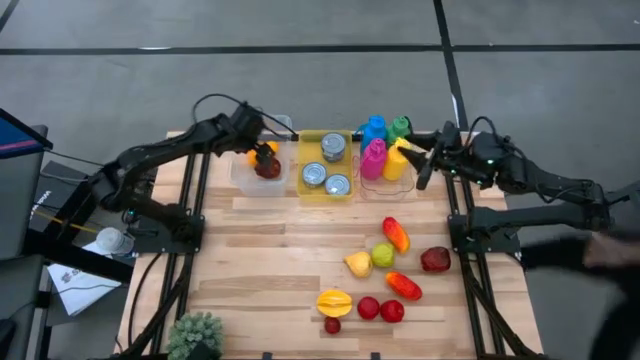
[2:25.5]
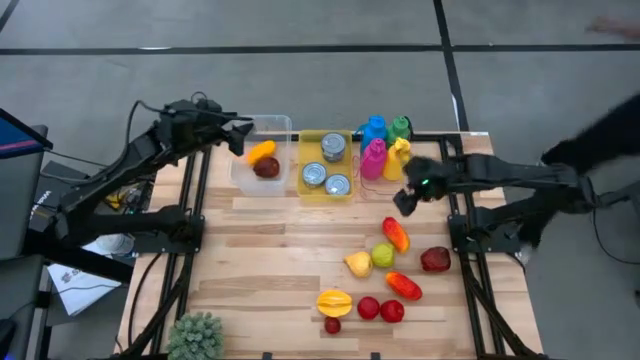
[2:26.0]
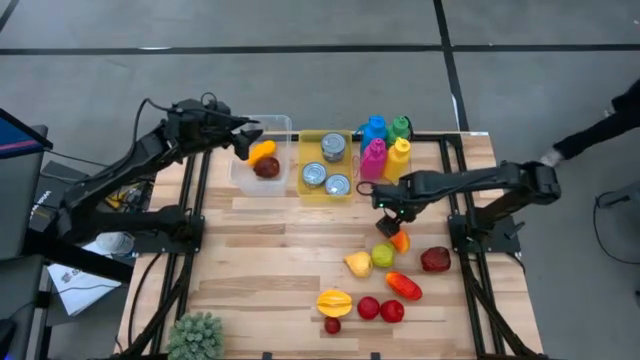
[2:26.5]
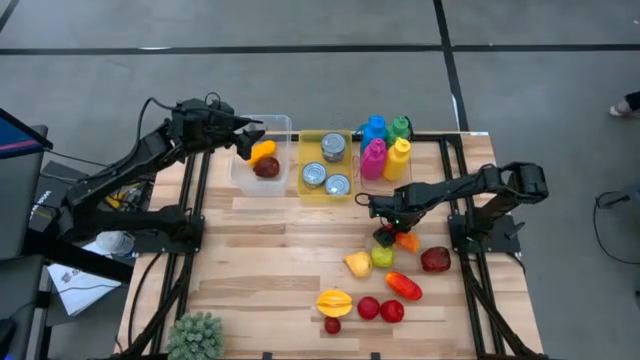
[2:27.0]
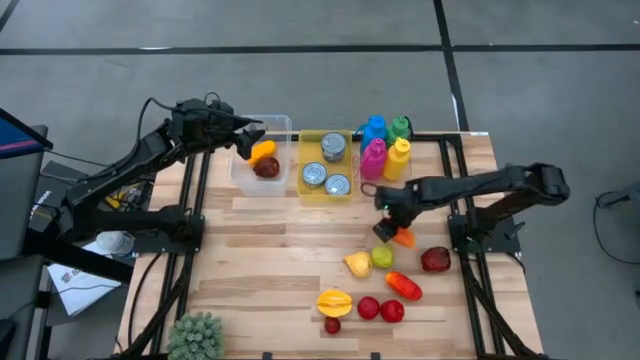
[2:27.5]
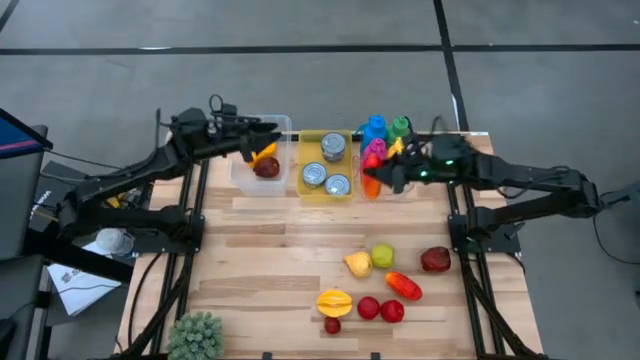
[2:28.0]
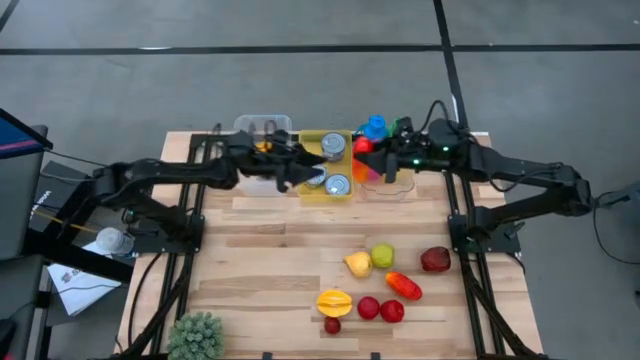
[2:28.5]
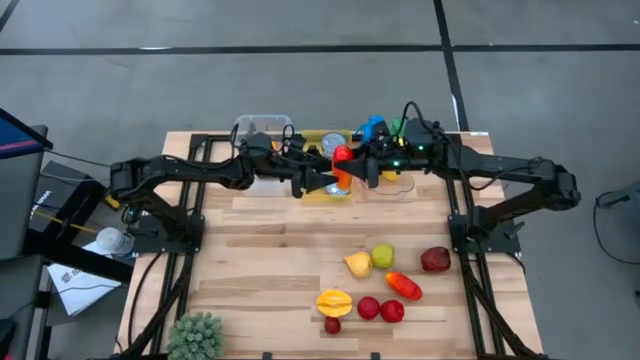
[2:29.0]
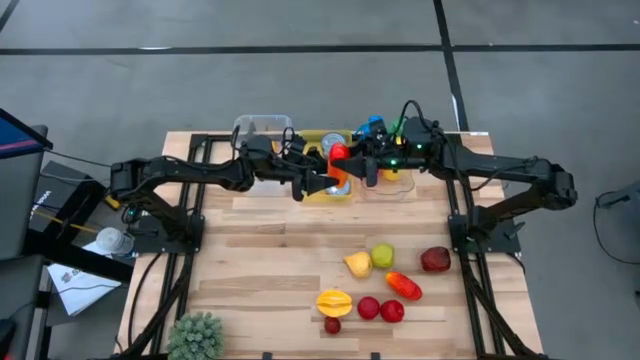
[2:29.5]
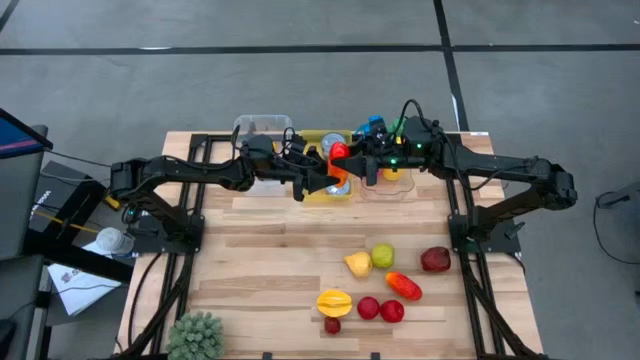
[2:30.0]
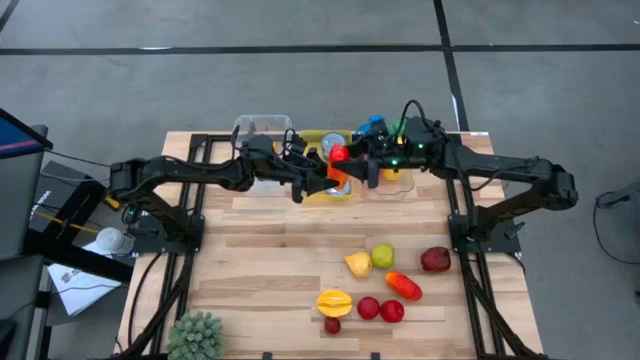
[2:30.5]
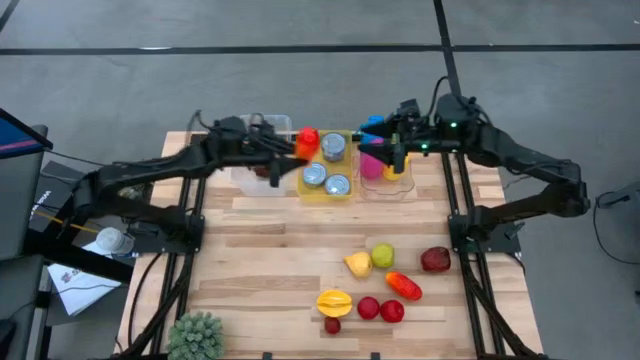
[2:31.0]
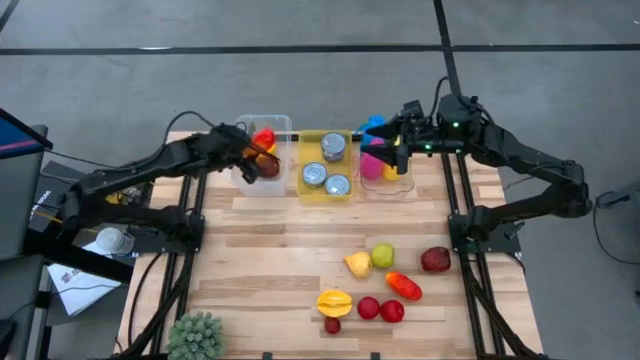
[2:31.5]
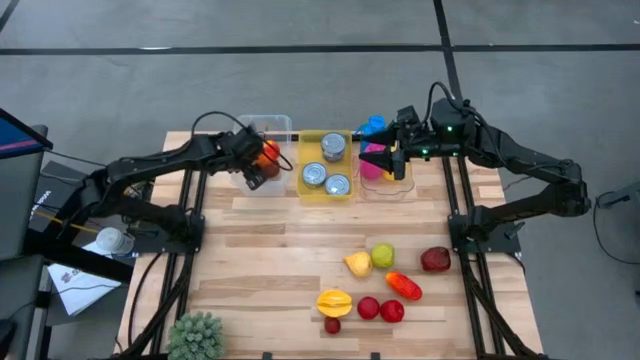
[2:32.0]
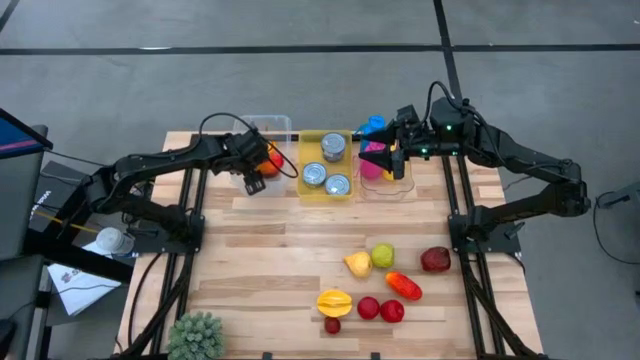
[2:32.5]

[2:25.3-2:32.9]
Task: Pick & Place Food Item
Put the top red mango into the transparent container

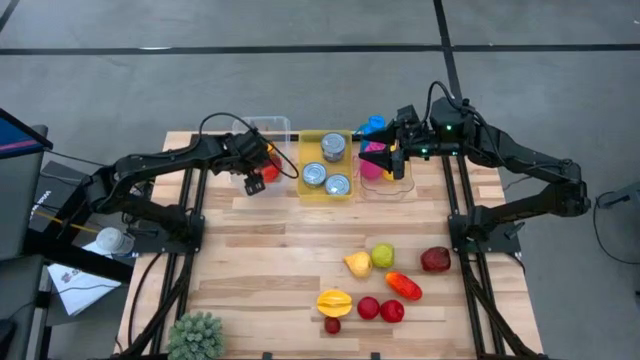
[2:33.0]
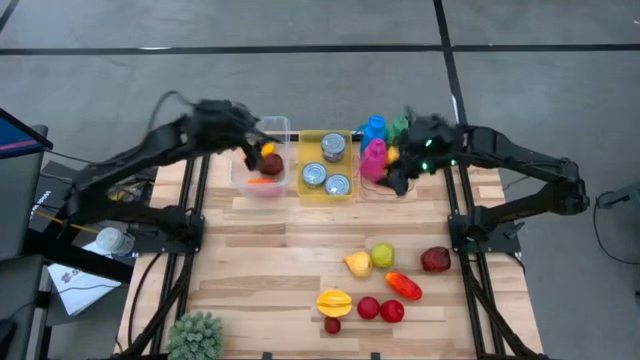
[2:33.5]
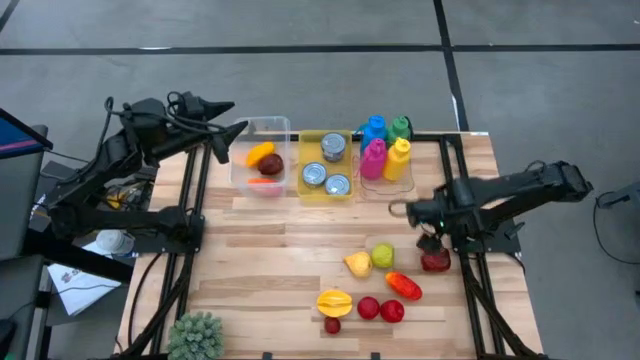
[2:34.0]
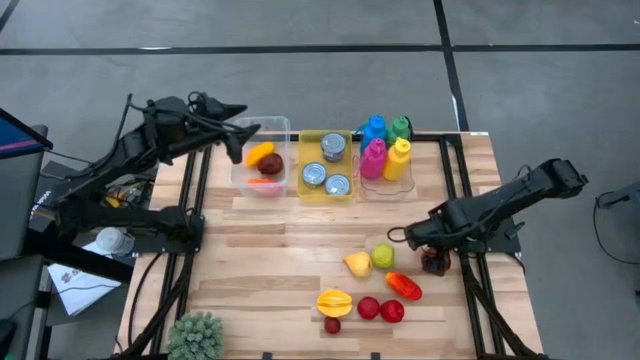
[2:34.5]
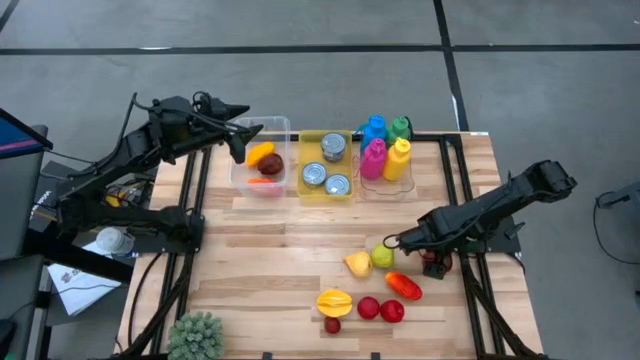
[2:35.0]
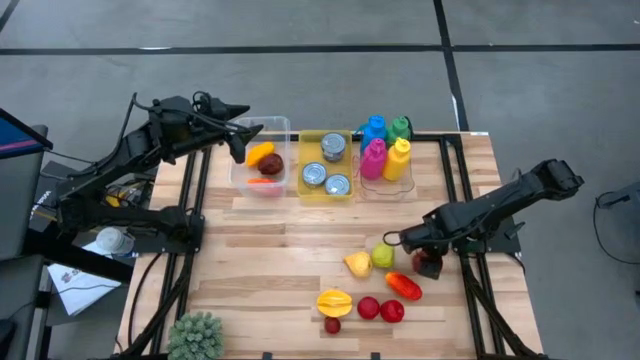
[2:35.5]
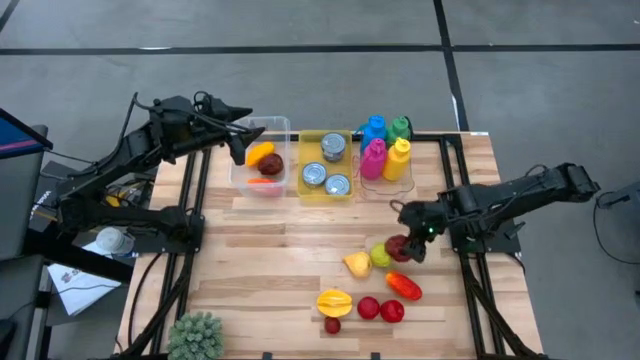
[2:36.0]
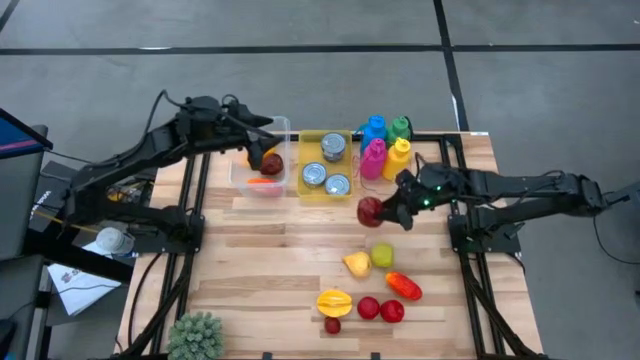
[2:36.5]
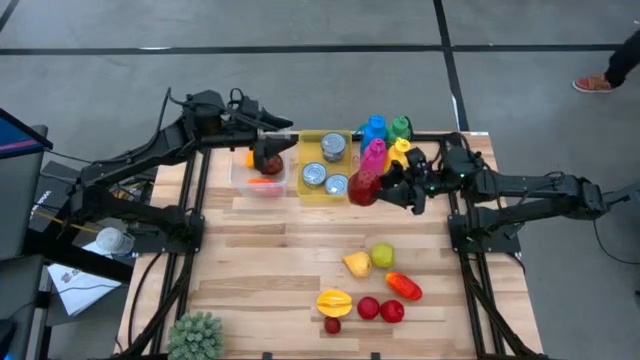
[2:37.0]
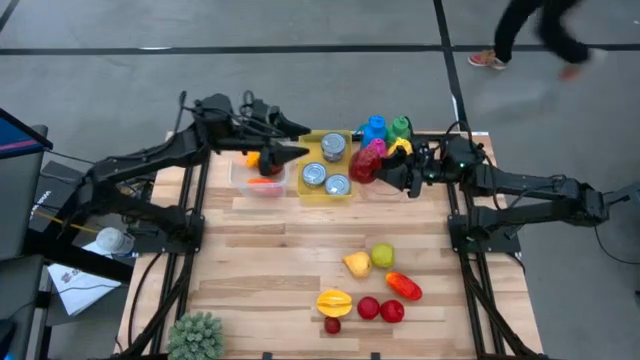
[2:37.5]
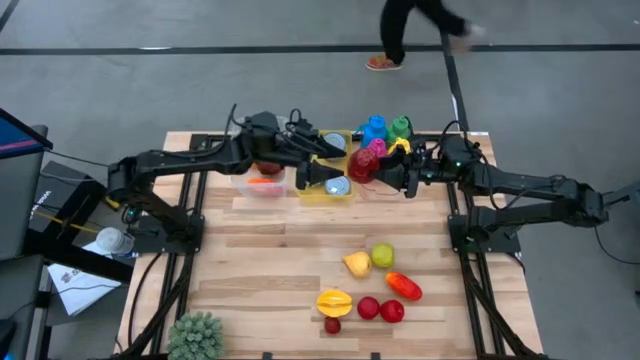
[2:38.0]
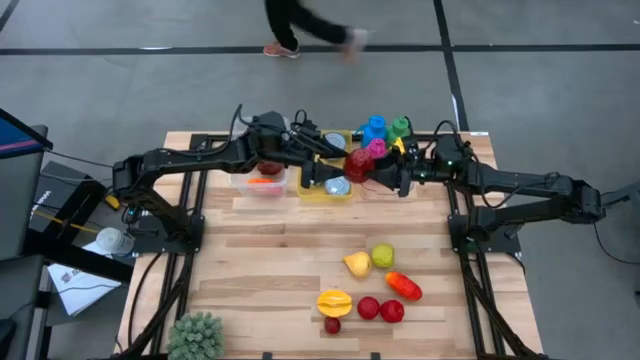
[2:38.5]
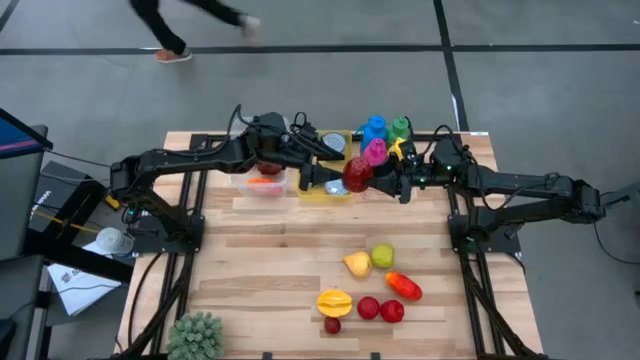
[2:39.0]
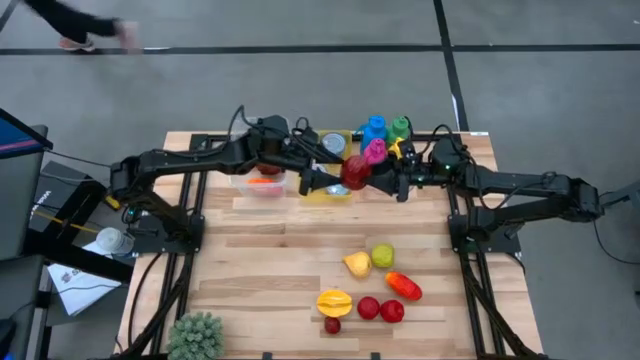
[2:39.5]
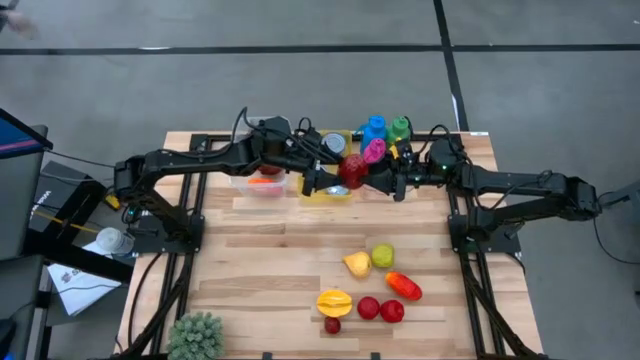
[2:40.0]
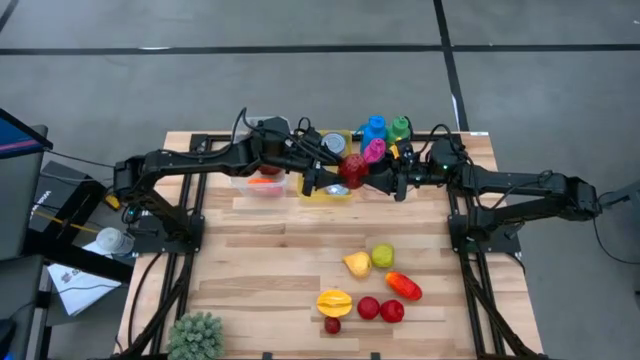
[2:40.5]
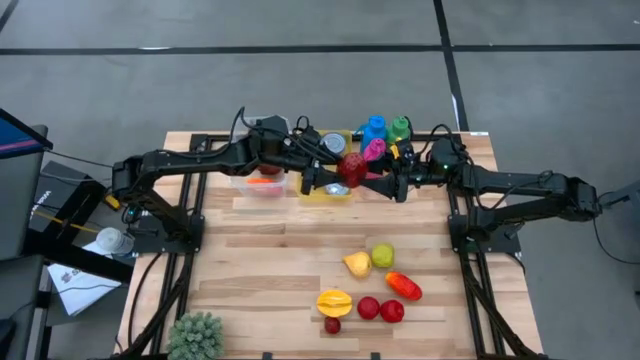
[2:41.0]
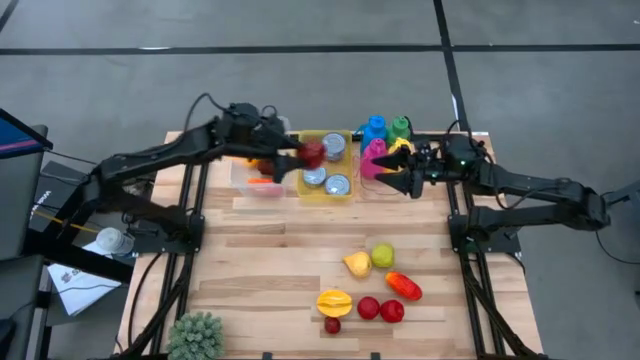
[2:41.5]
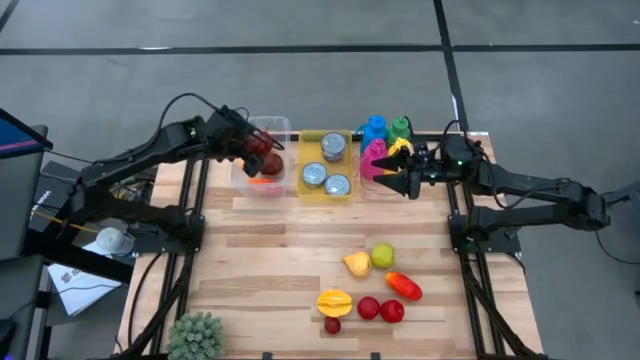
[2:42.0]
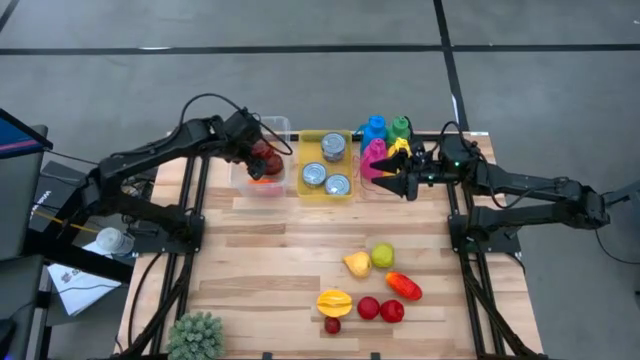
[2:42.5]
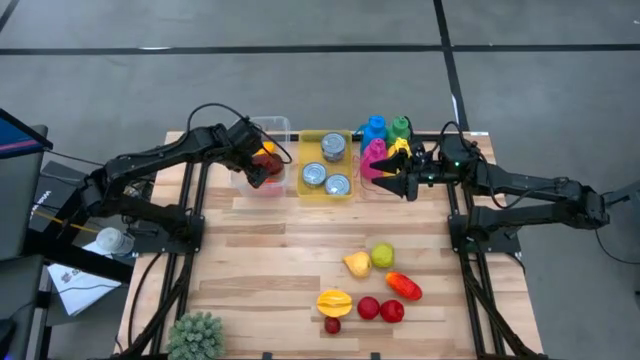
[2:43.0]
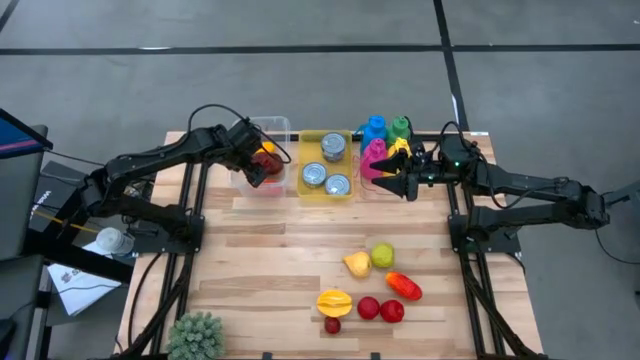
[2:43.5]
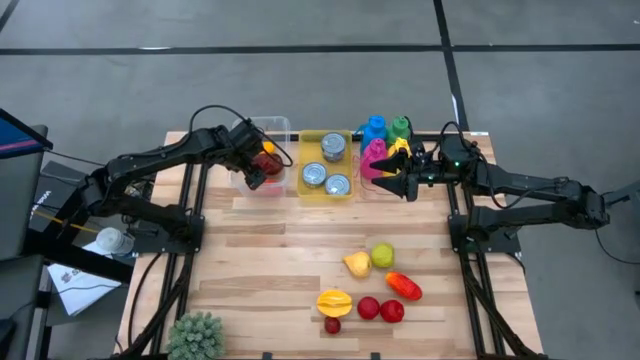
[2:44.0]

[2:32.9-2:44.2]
Put the red apple into the transparent container

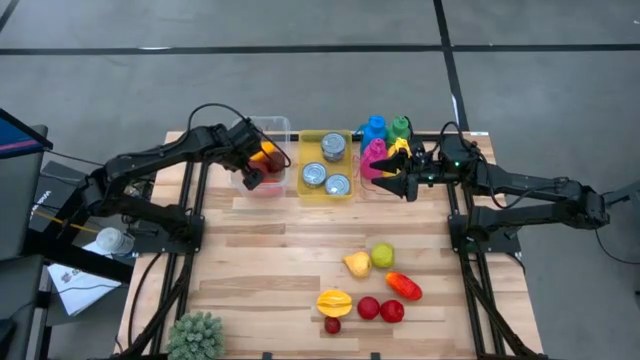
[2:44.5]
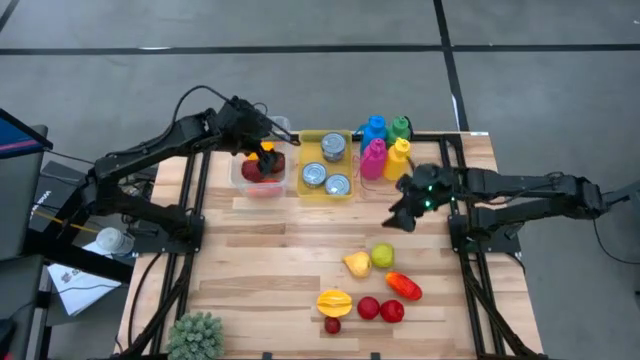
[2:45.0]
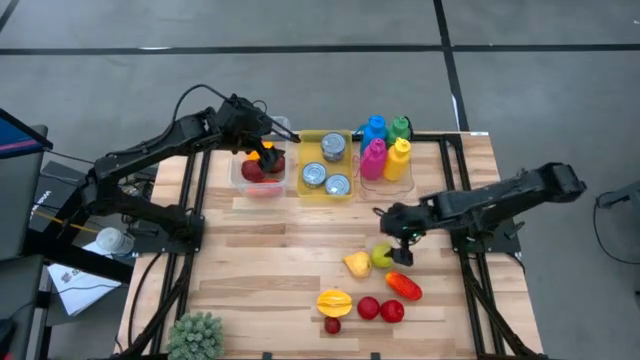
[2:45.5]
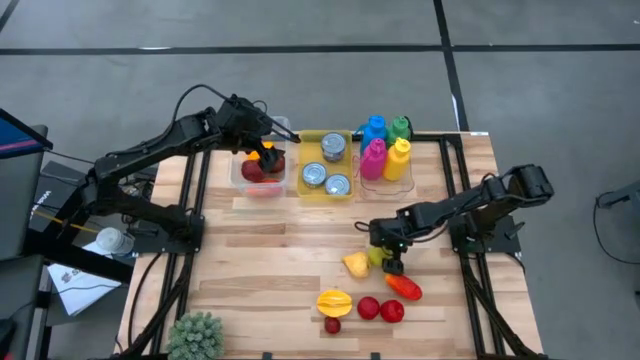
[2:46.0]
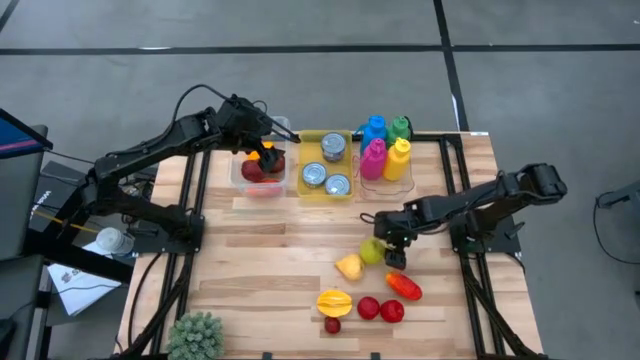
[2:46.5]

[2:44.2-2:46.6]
Put the green apple into the transparent container
